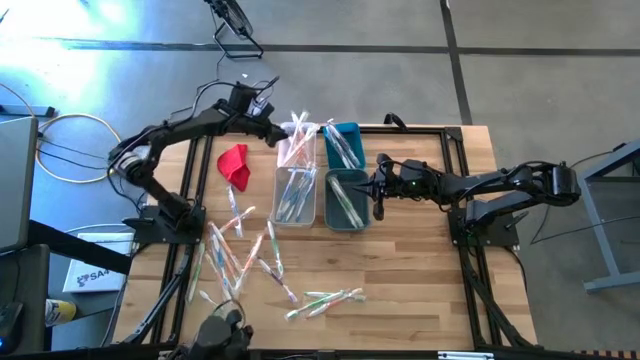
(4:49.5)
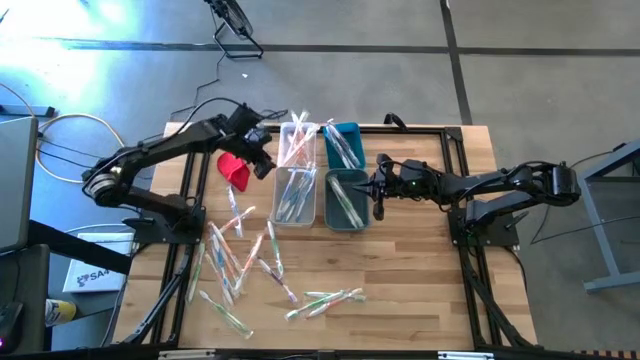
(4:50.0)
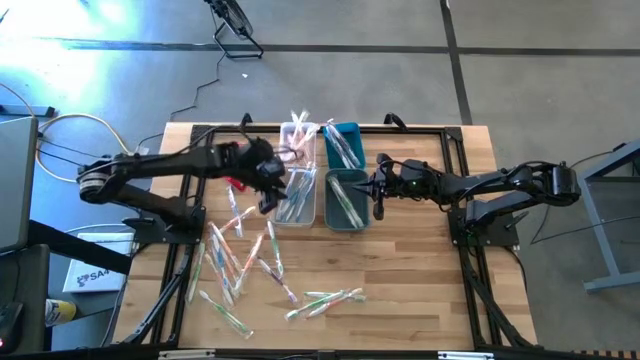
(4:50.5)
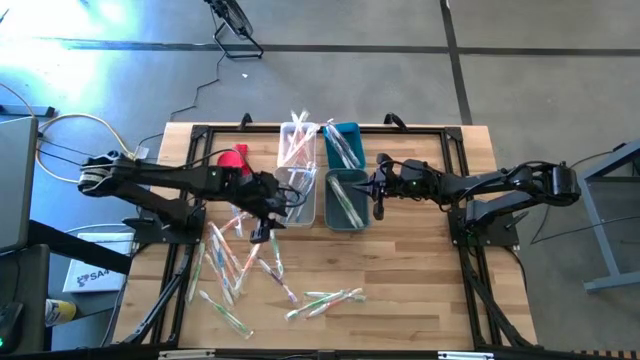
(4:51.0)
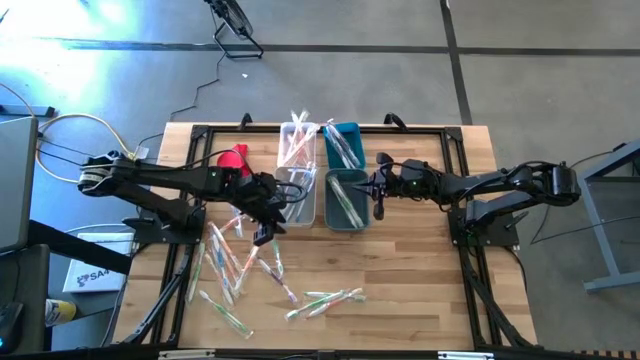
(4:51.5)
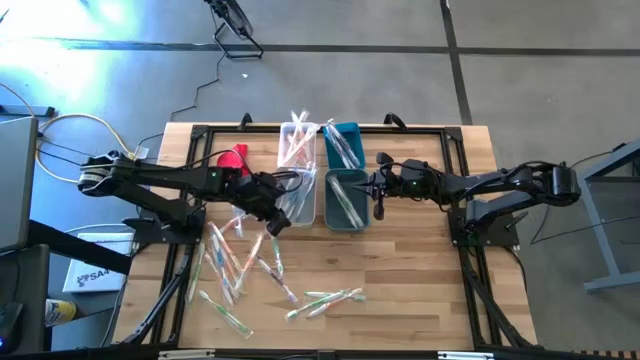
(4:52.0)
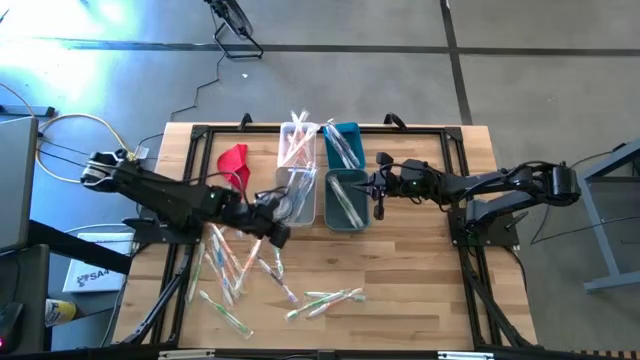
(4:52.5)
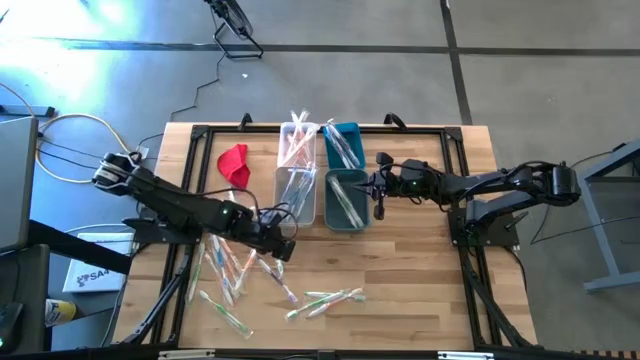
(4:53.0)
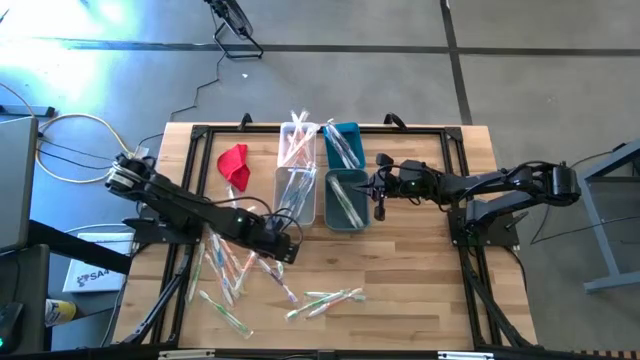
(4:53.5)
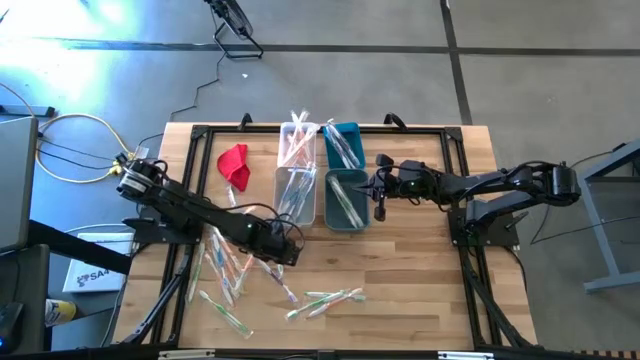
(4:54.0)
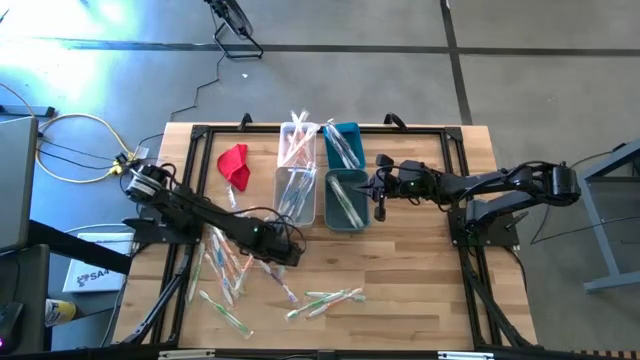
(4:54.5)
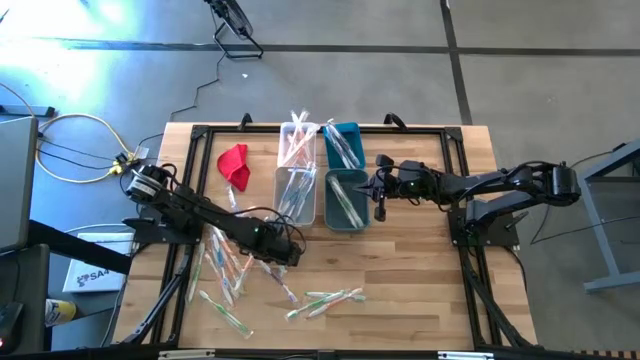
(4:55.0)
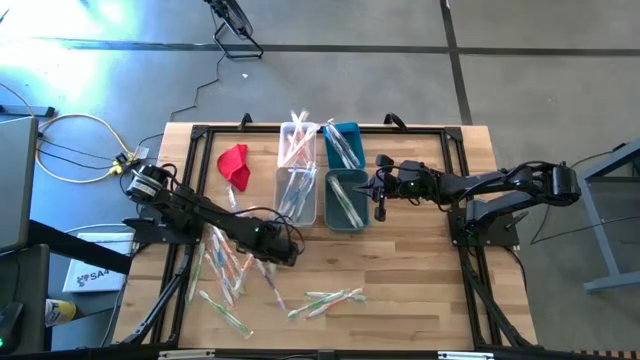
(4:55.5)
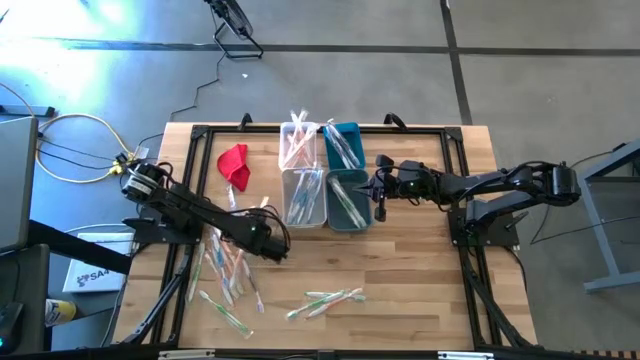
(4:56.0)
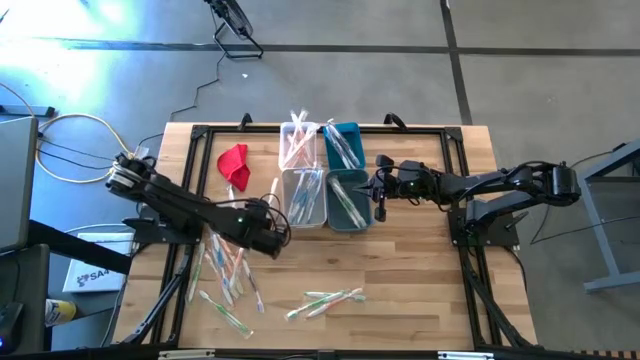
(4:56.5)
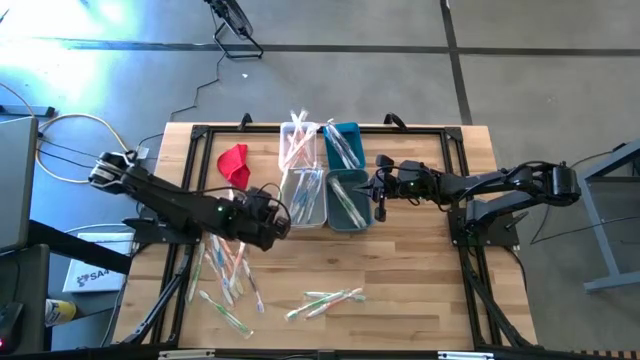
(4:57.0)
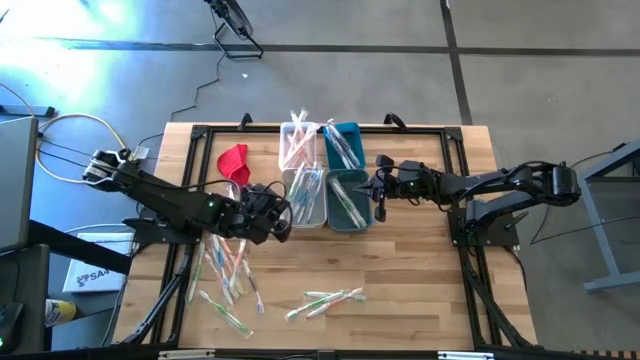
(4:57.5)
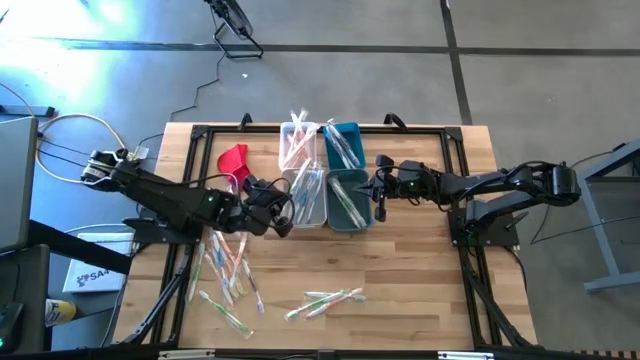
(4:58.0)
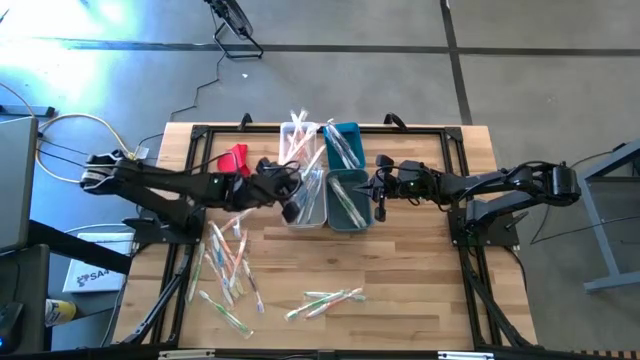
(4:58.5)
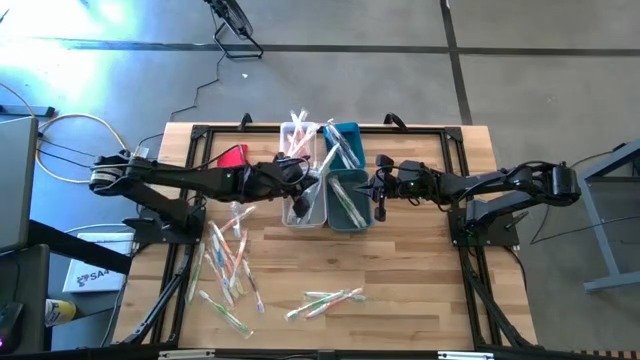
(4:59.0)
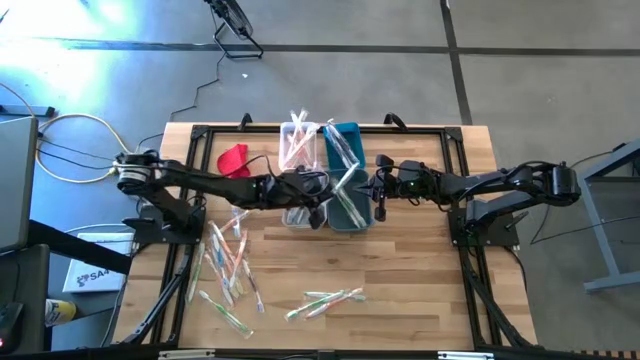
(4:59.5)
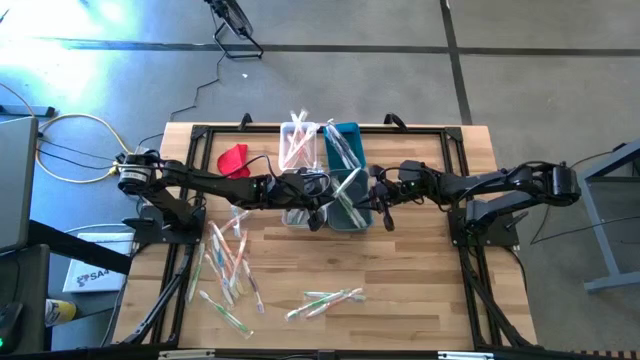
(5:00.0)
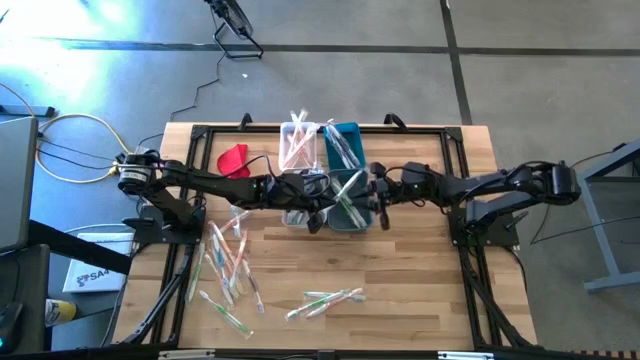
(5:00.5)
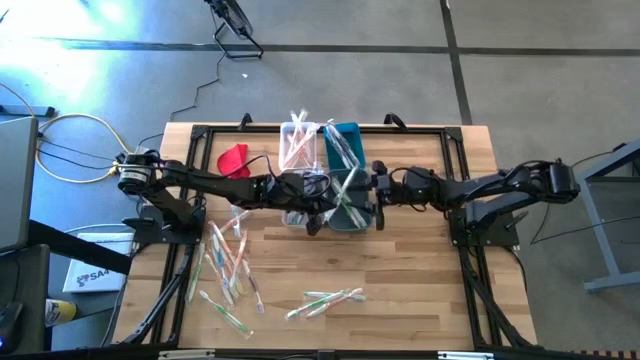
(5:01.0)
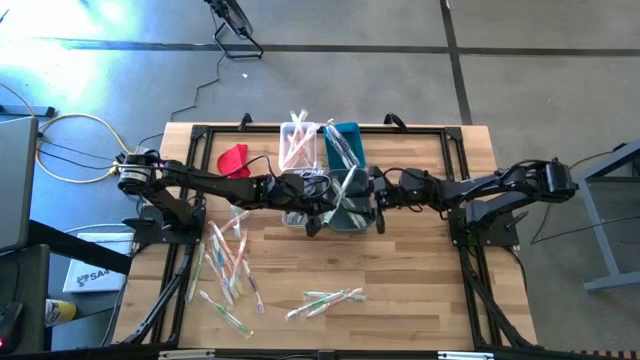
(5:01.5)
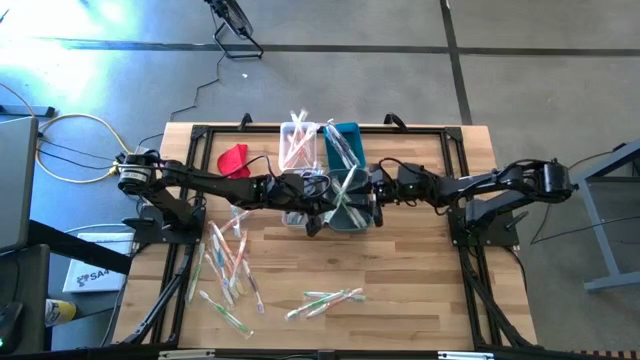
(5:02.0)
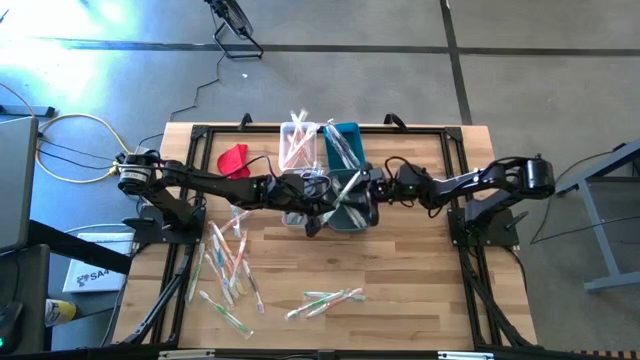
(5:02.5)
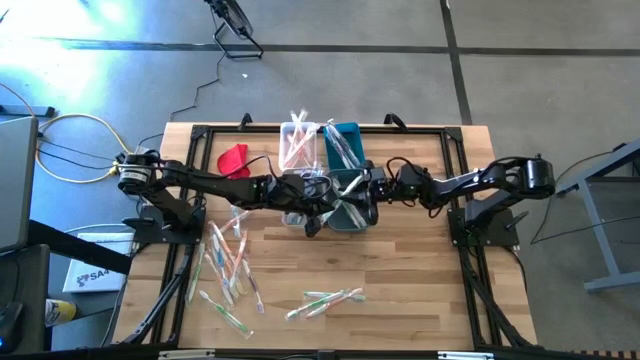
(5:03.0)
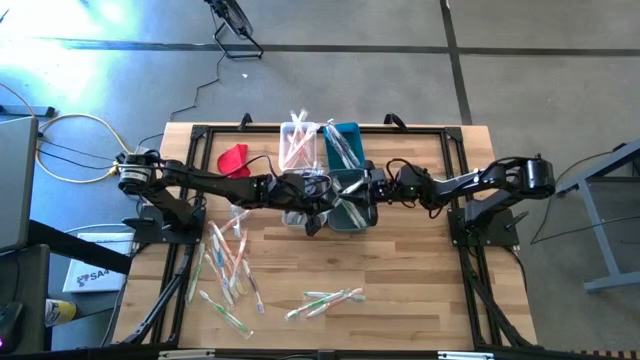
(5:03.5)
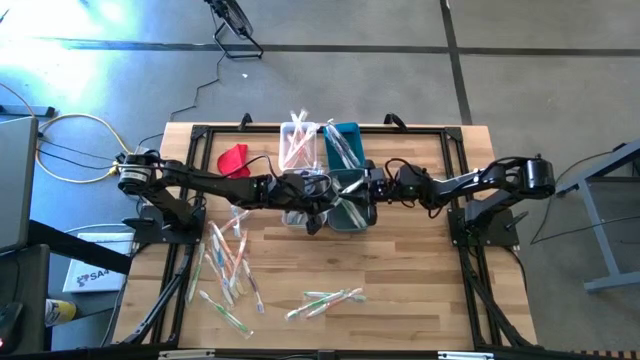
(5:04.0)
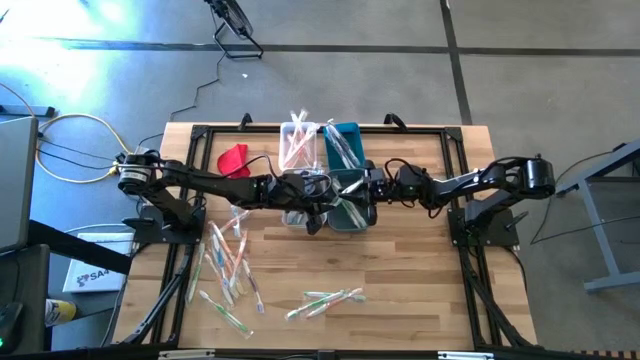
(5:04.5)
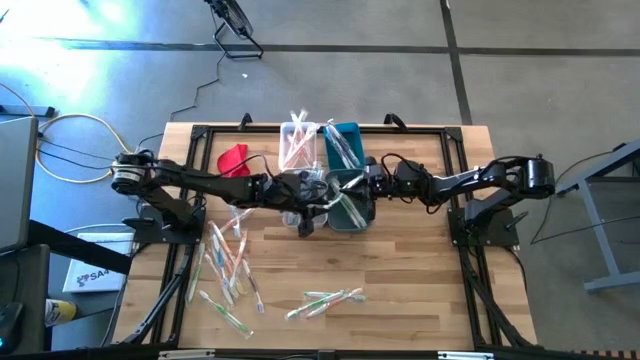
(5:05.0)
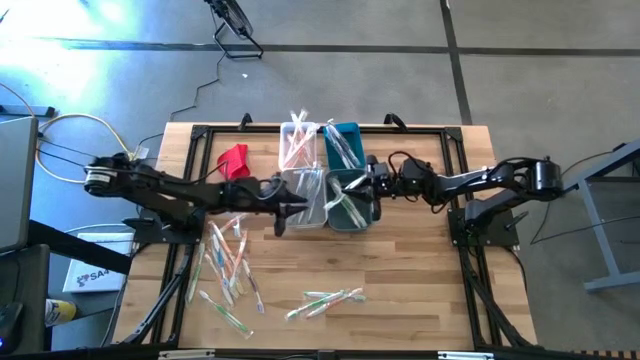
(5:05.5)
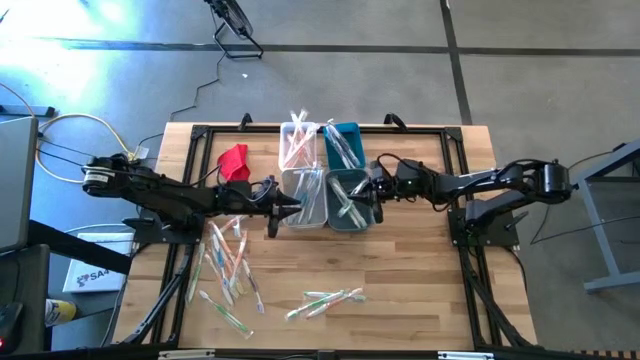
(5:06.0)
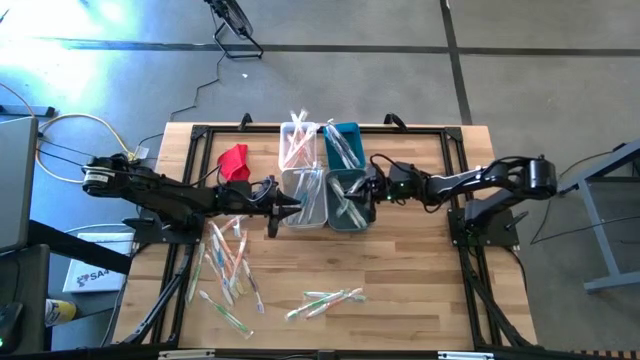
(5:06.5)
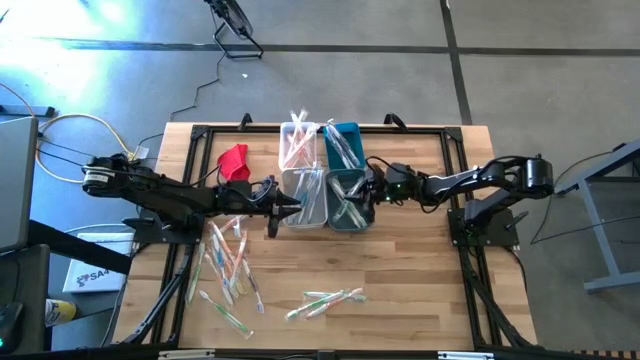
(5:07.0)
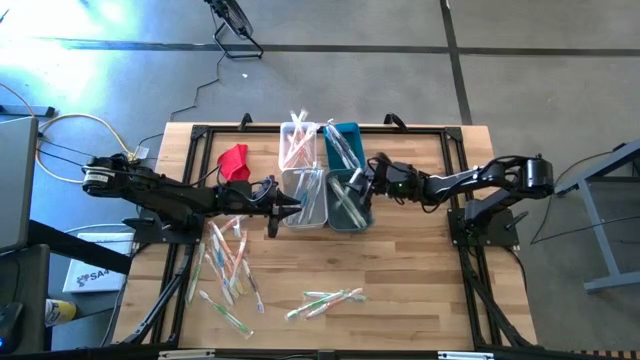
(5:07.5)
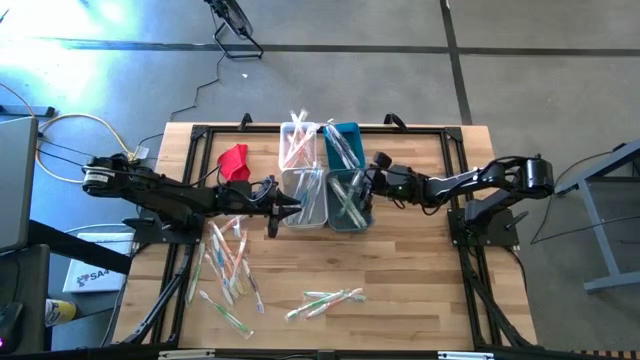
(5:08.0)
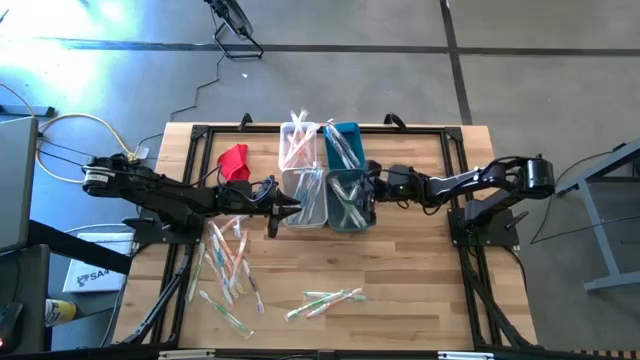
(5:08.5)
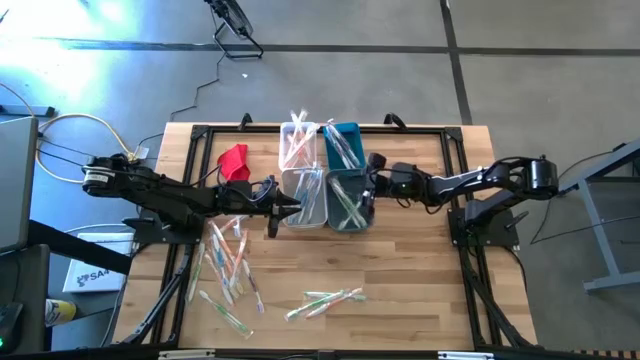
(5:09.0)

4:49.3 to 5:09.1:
Task: Pick & Place Toothbrushes
Put the green toothbrush into the blue bin
